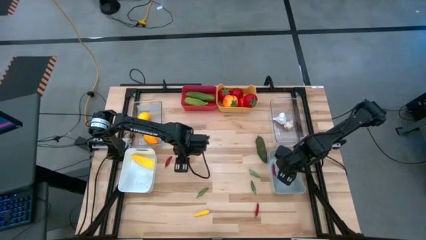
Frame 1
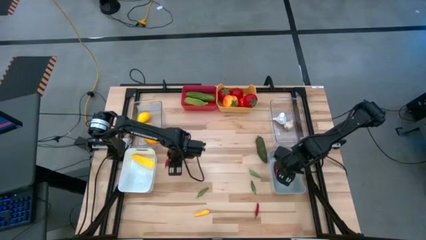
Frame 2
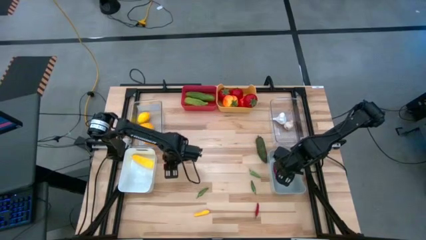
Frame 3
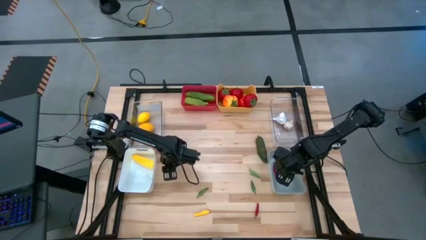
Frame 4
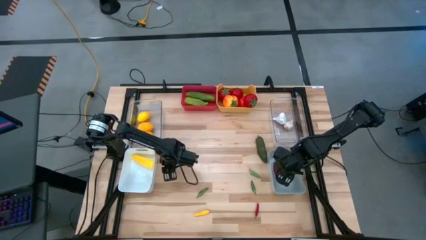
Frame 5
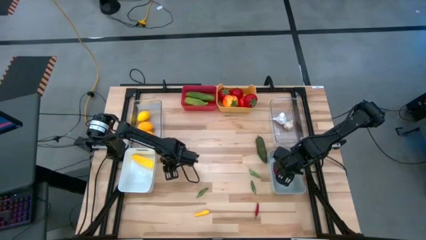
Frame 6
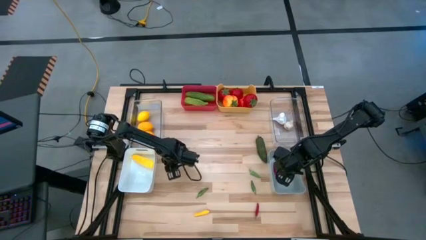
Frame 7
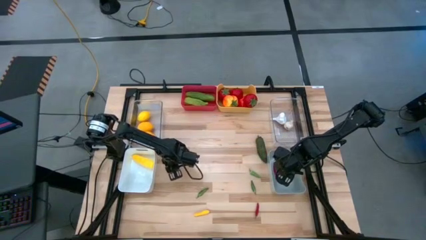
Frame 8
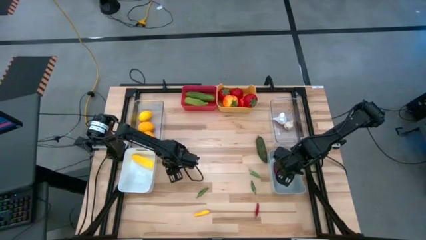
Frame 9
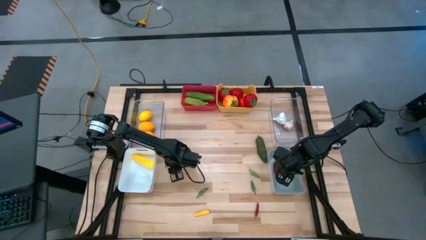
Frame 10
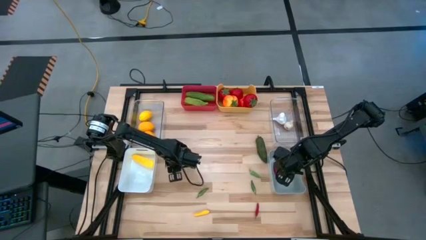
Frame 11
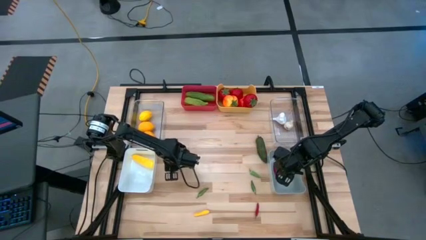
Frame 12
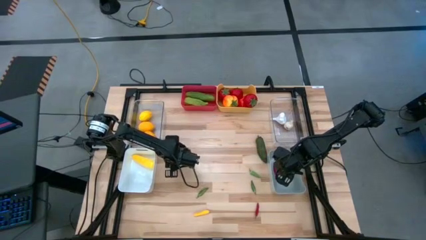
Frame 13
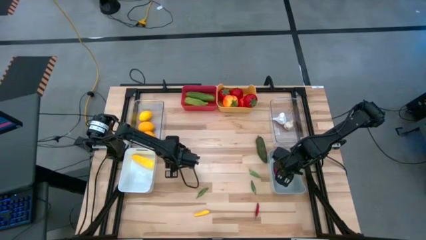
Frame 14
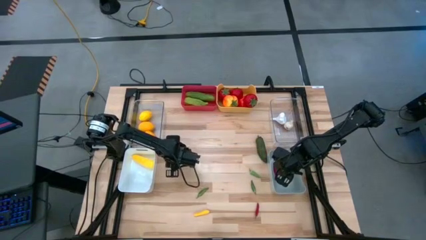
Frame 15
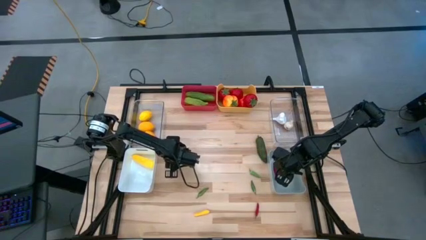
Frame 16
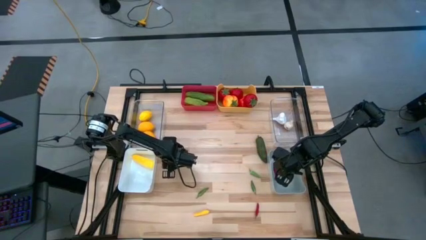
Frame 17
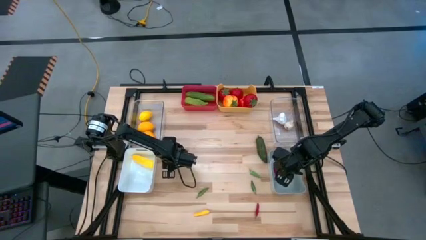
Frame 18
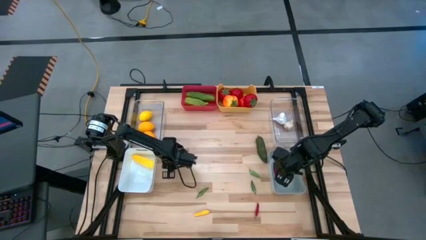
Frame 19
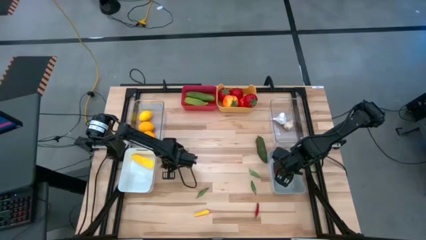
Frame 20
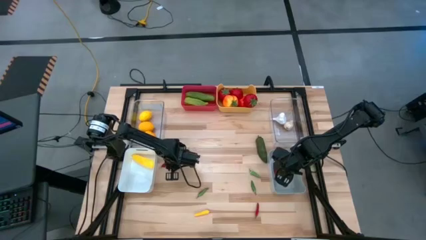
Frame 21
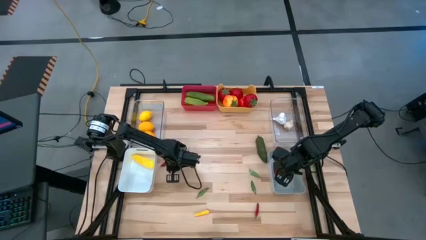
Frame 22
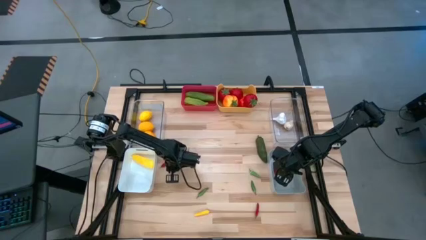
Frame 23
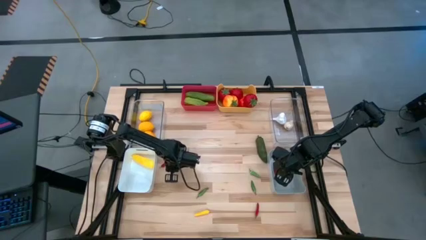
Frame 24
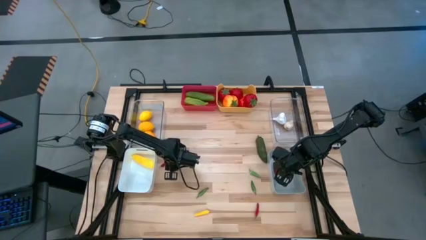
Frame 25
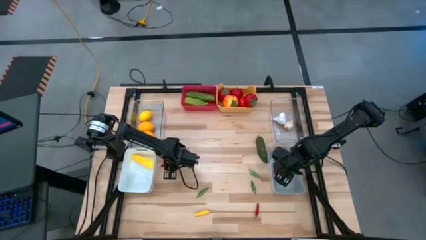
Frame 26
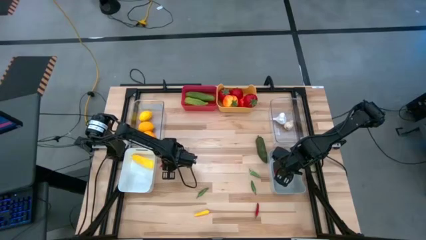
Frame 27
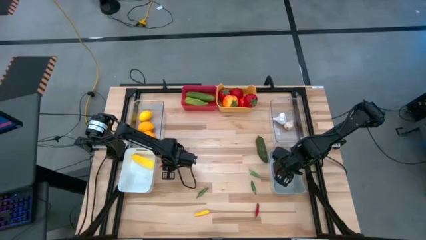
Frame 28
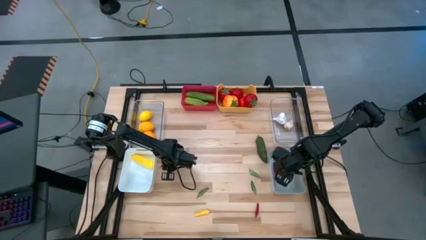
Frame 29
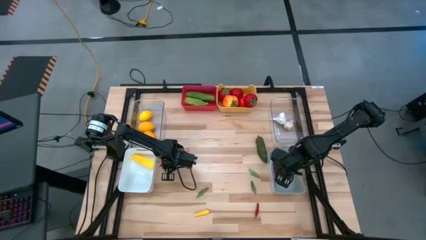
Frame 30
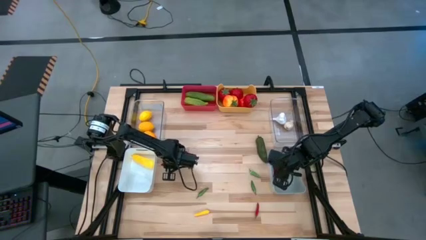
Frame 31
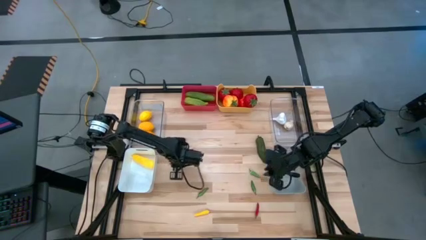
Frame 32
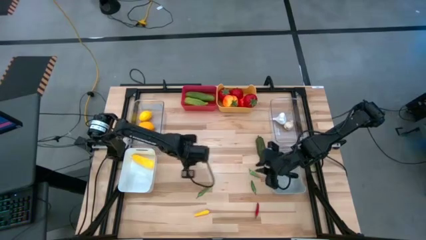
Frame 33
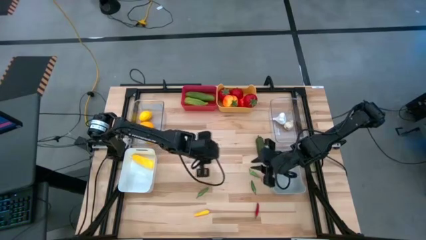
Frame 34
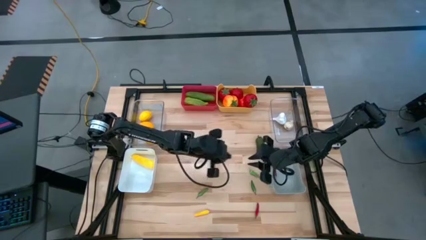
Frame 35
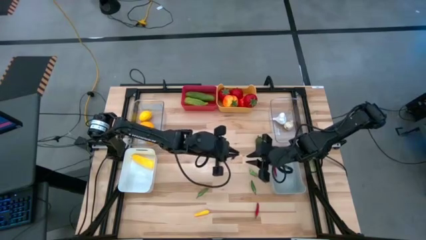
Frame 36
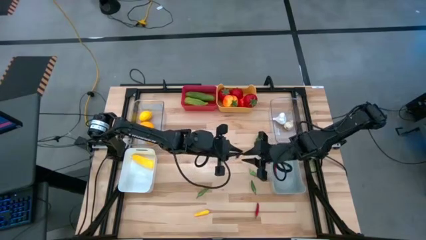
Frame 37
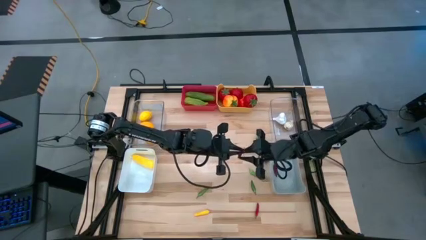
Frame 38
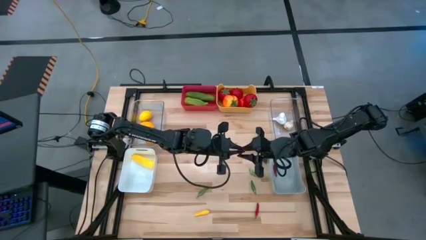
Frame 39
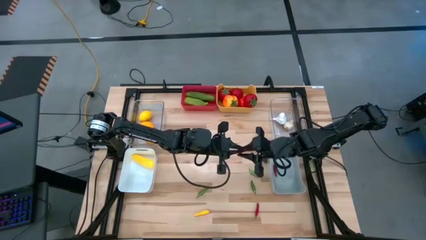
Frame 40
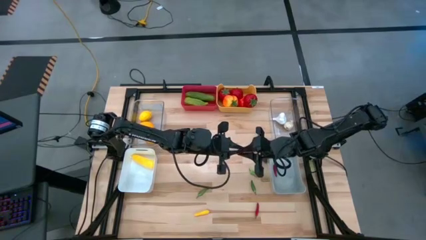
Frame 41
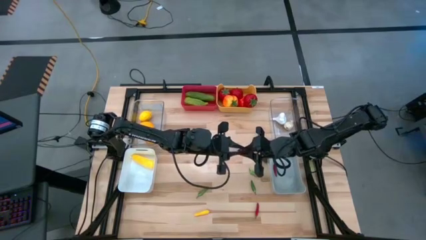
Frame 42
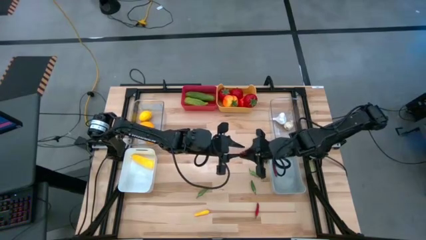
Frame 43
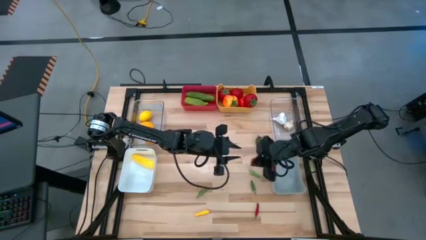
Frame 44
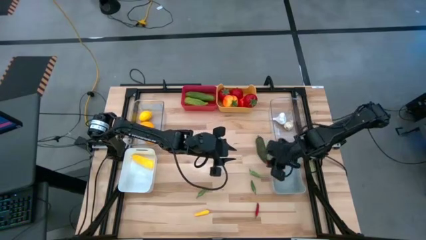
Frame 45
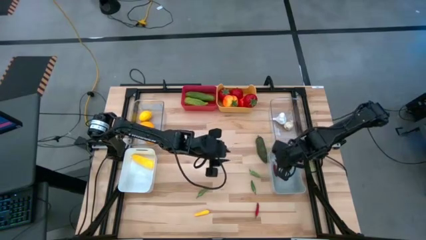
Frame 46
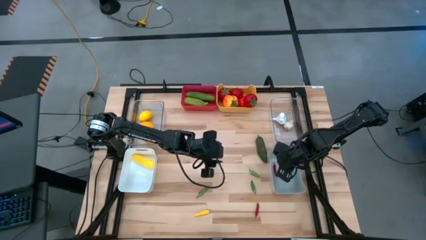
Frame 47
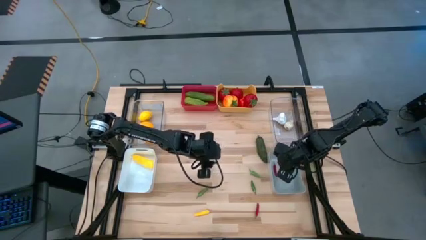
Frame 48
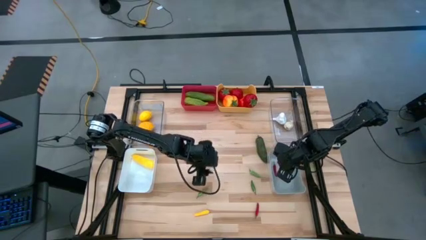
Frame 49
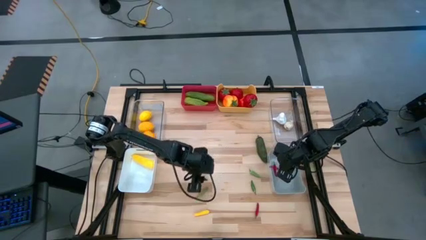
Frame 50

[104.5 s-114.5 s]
Task: Sort produce into baskets
Put the red chili pepper into the gray bin

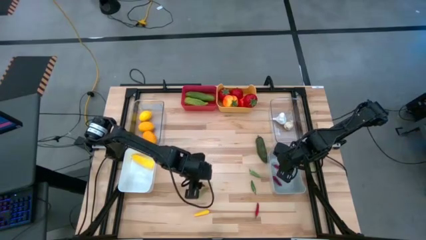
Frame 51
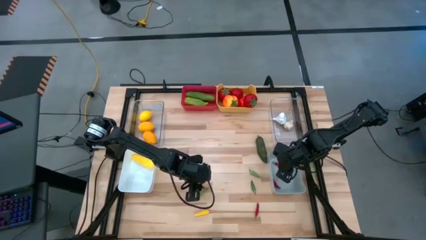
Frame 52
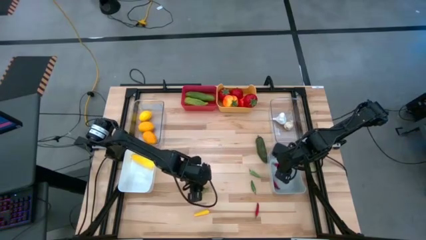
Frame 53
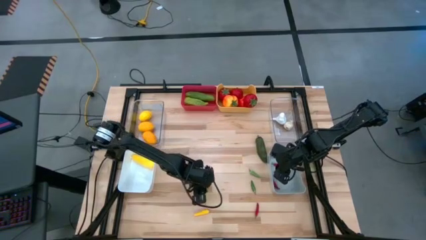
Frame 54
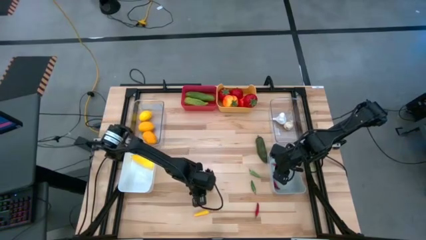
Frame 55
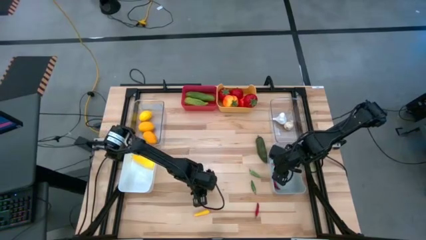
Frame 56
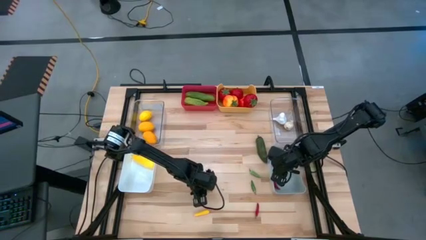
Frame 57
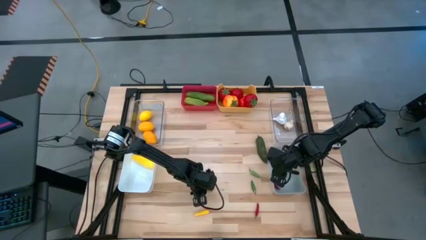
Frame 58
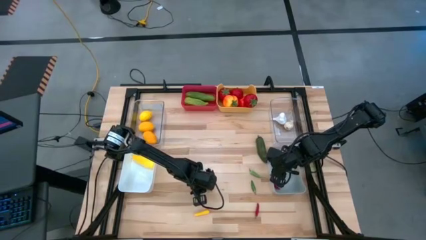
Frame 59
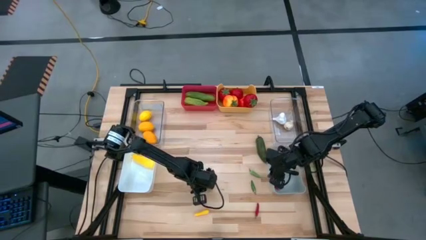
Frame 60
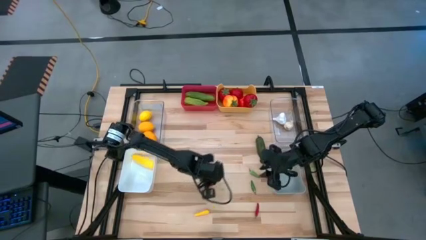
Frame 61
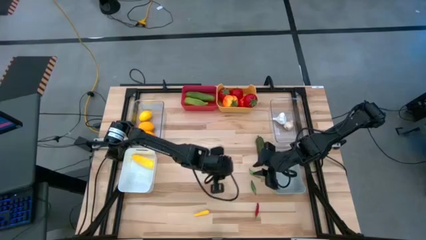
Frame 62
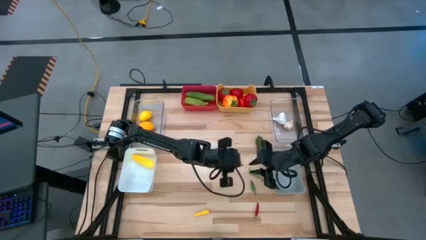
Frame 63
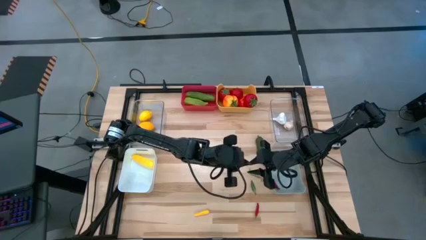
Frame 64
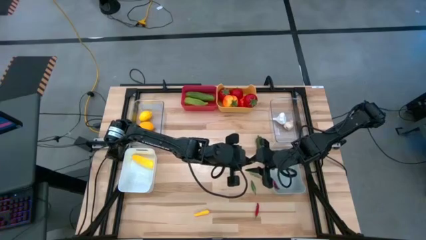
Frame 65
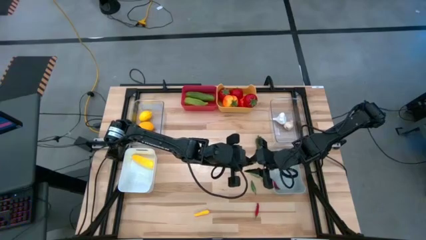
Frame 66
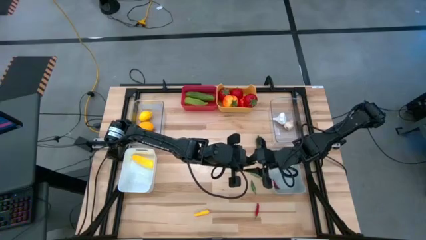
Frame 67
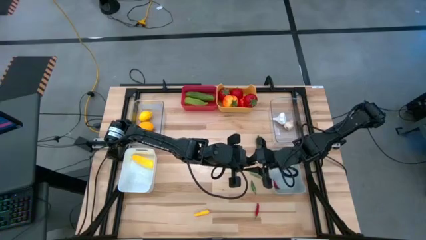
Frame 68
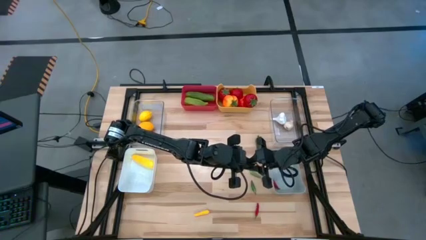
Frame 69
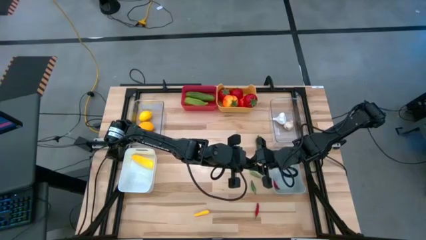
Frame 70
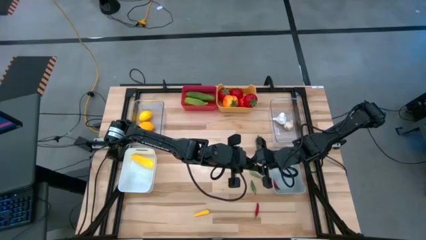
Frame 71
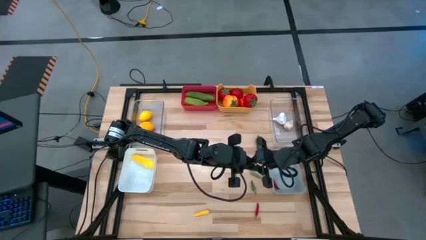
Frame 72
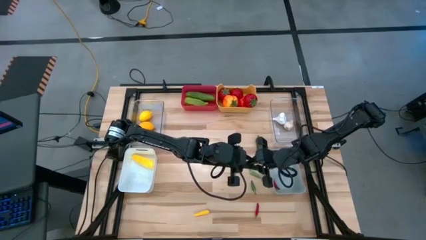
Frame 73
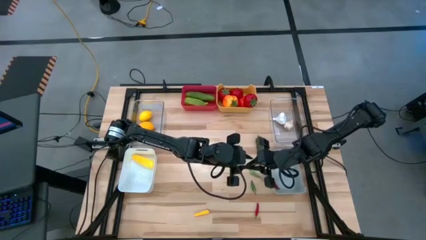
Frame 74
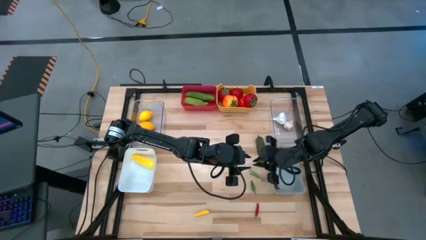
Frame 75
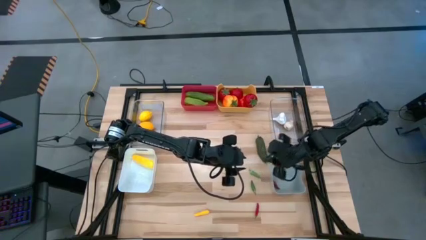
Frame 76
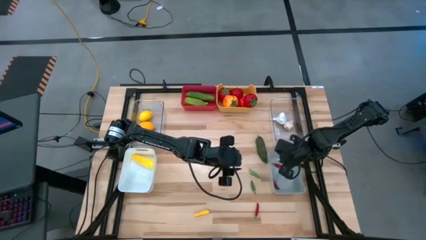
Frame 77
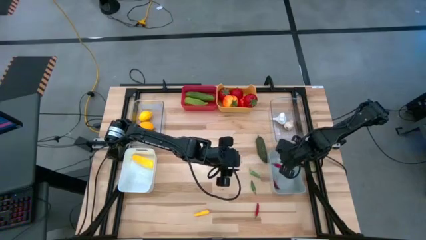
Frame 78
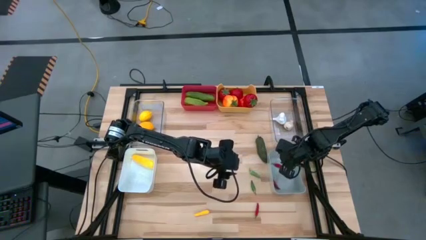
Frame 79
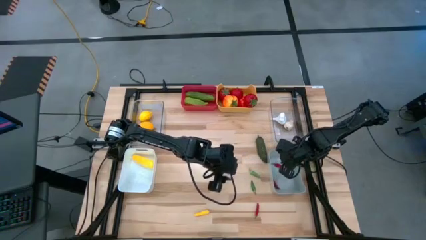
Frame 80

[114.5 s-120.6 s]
Put the green chili pepper into the gray bin
